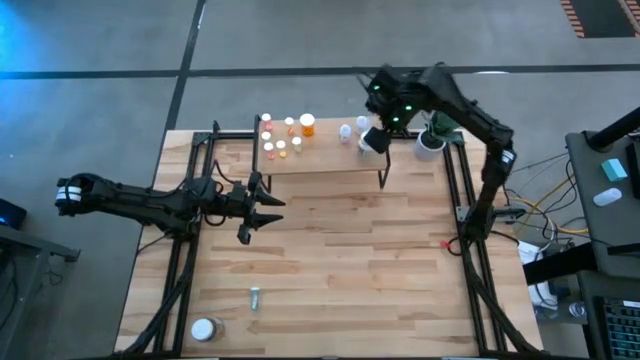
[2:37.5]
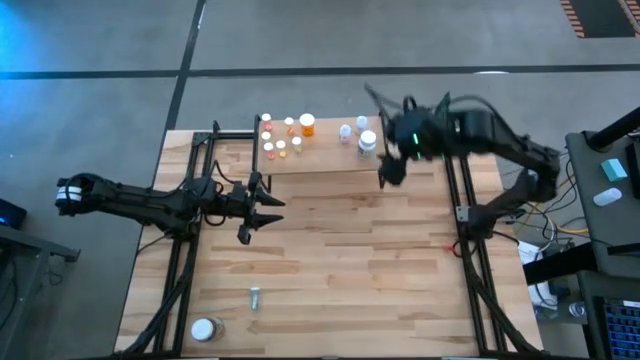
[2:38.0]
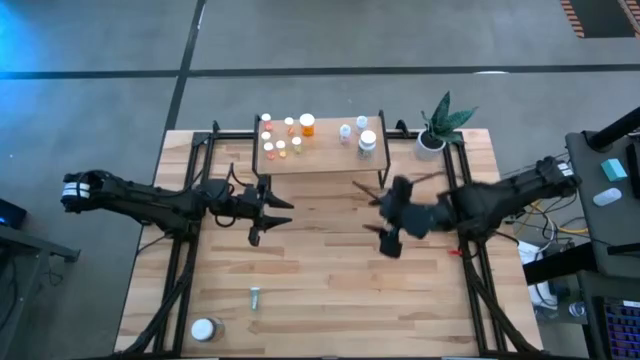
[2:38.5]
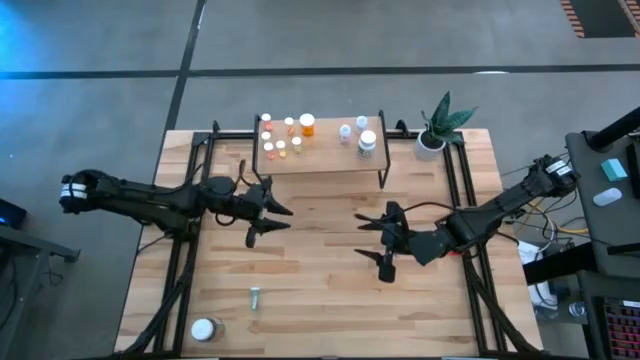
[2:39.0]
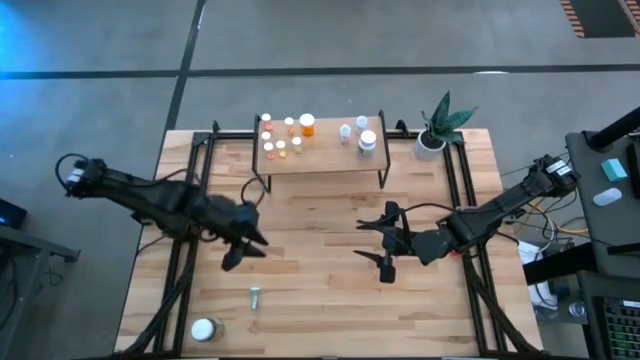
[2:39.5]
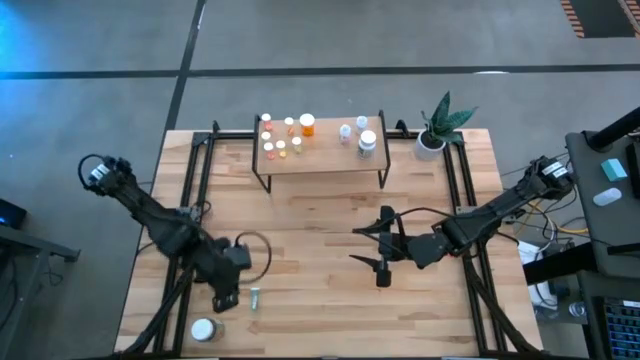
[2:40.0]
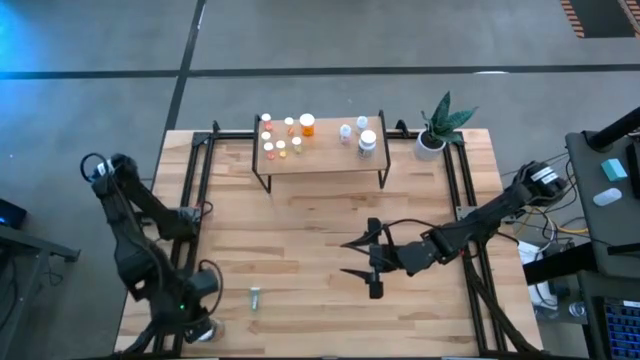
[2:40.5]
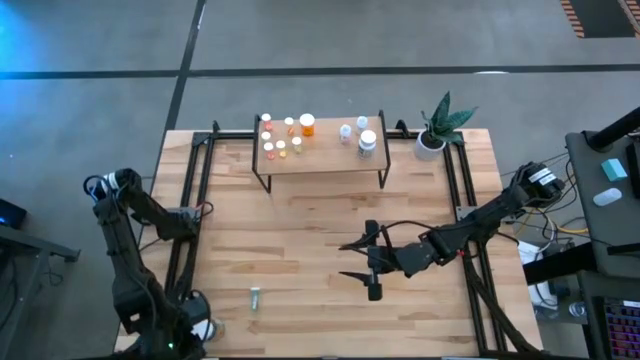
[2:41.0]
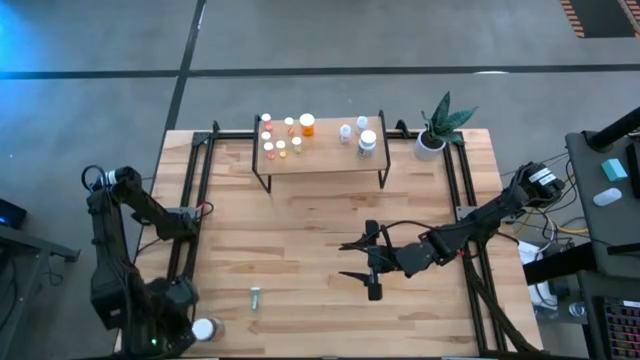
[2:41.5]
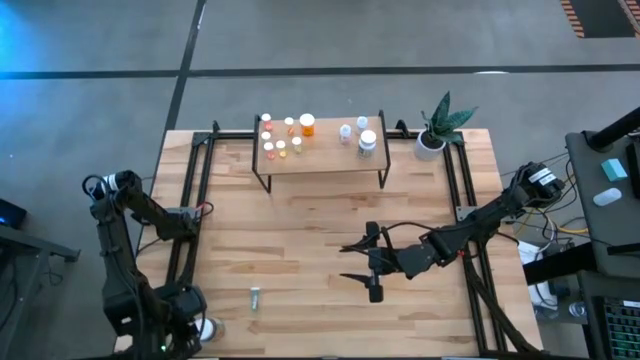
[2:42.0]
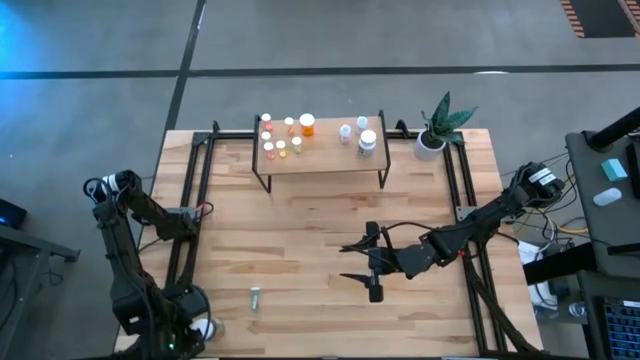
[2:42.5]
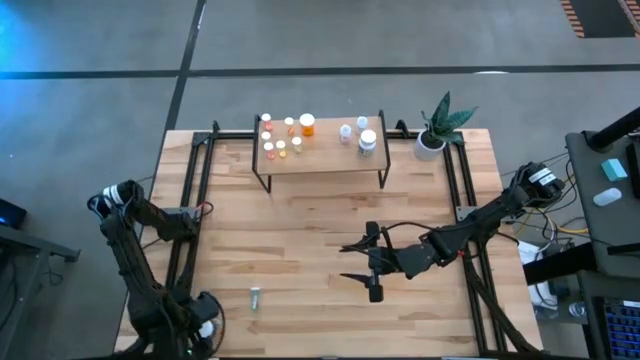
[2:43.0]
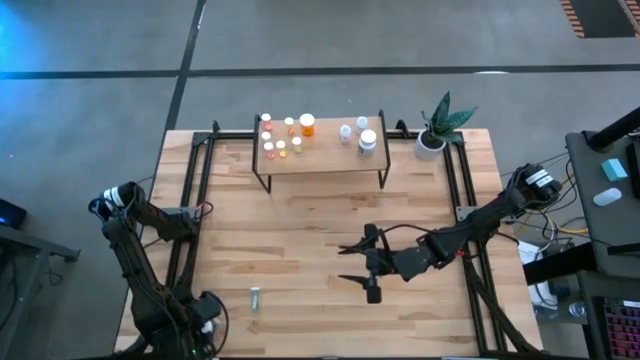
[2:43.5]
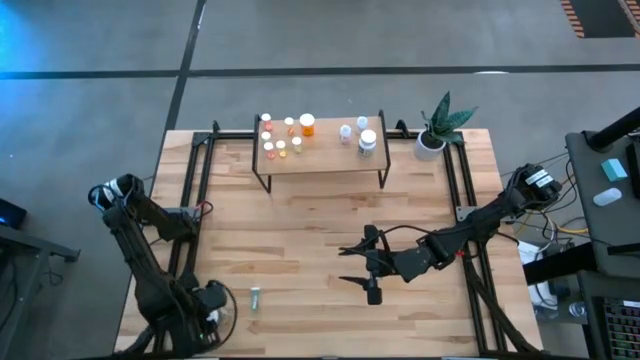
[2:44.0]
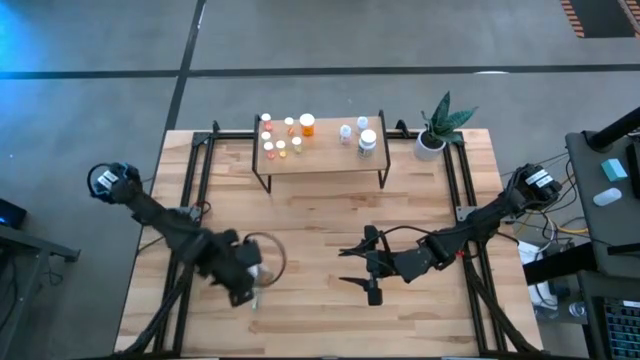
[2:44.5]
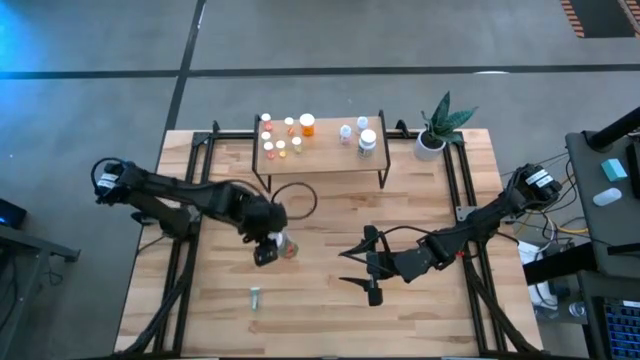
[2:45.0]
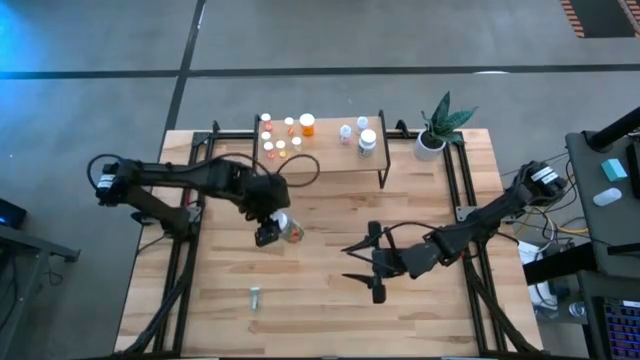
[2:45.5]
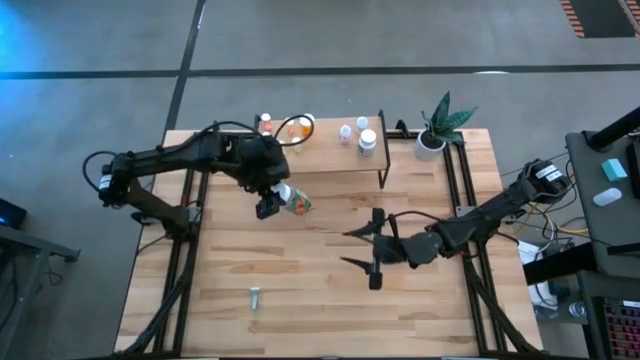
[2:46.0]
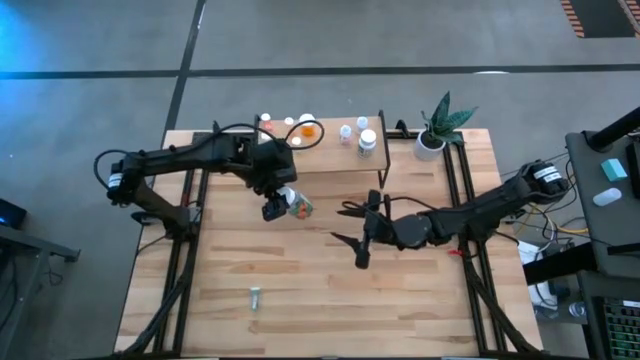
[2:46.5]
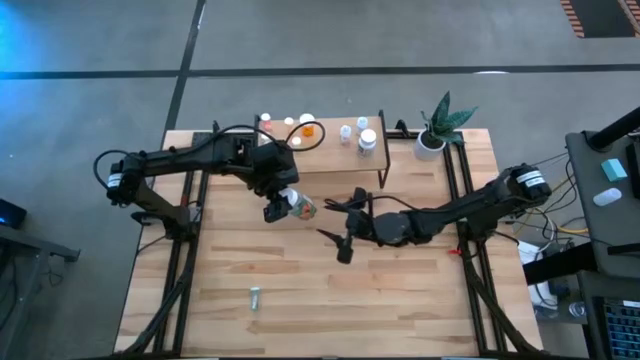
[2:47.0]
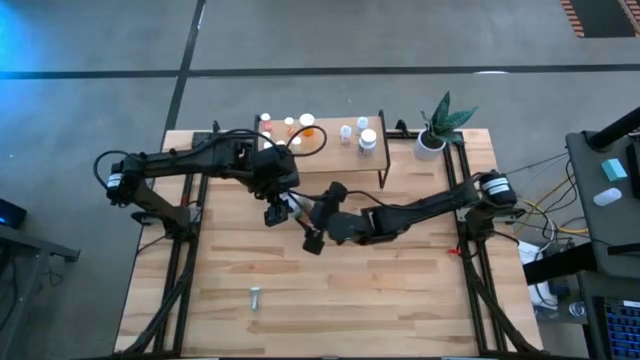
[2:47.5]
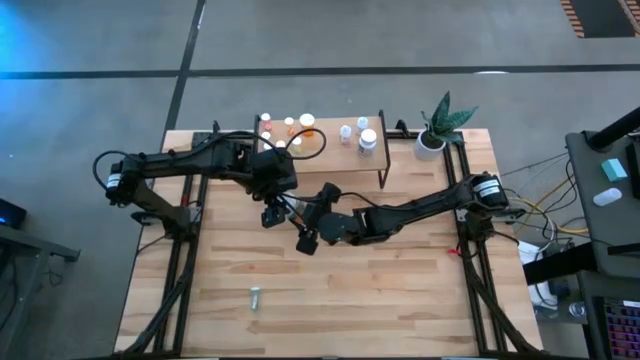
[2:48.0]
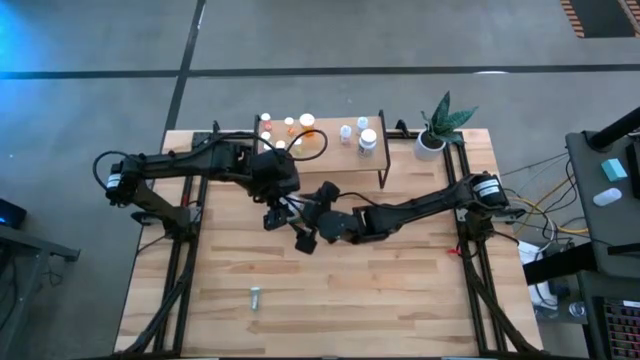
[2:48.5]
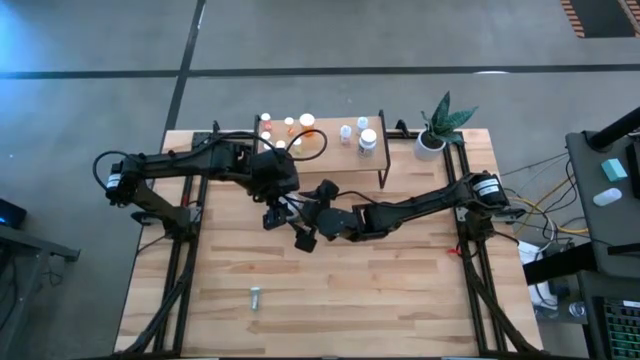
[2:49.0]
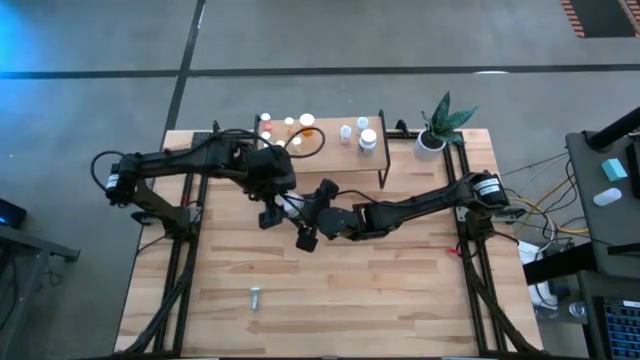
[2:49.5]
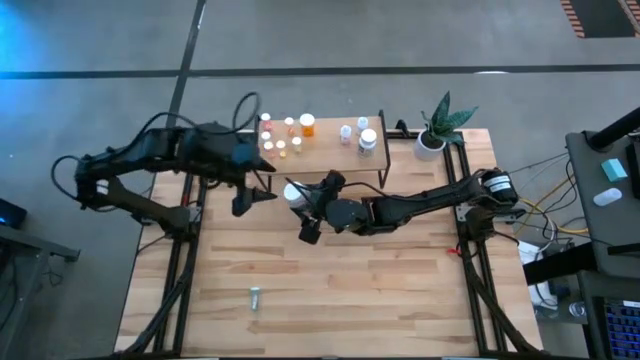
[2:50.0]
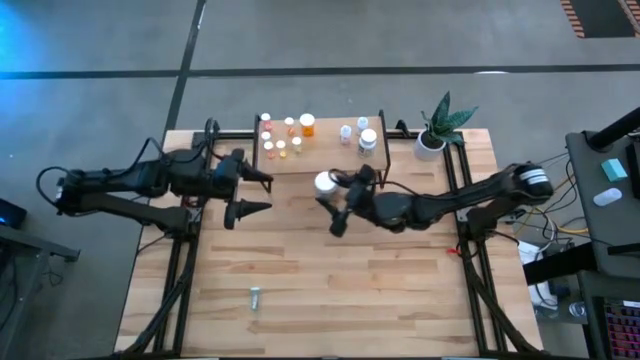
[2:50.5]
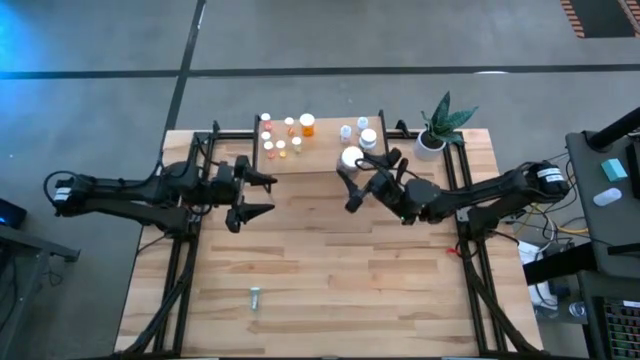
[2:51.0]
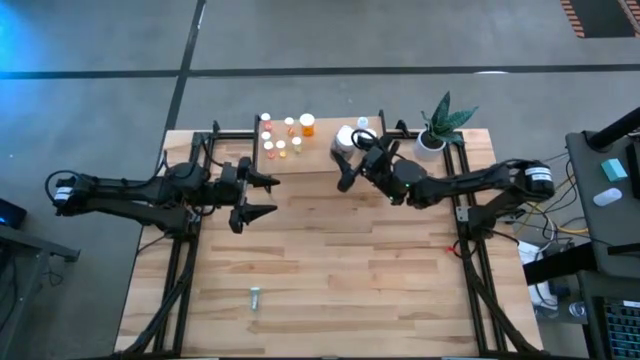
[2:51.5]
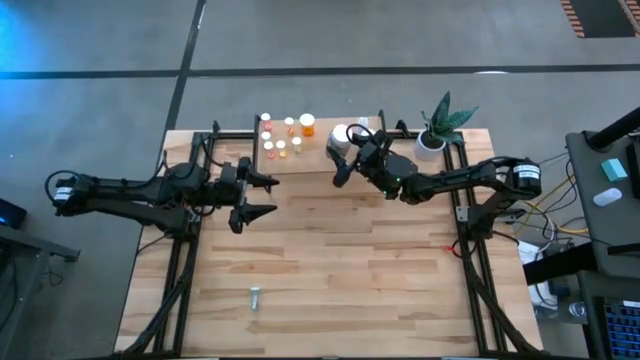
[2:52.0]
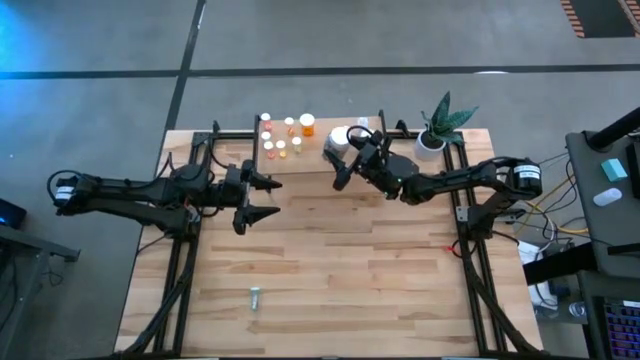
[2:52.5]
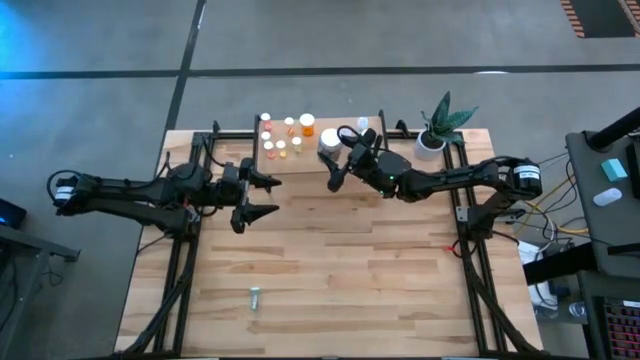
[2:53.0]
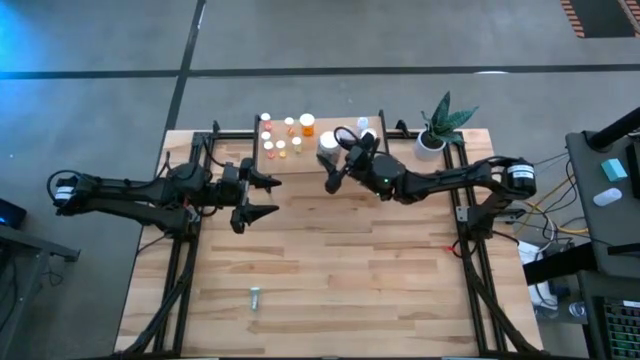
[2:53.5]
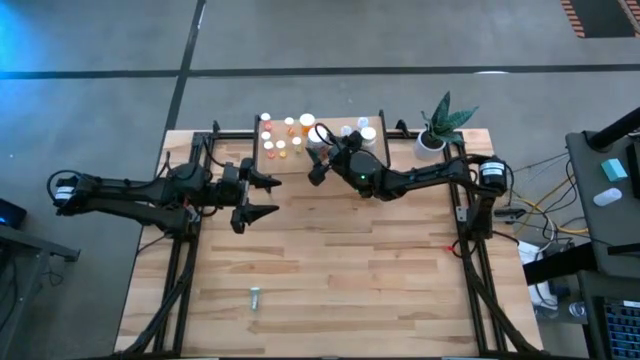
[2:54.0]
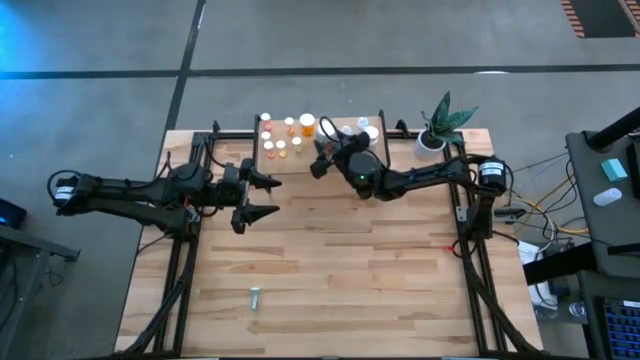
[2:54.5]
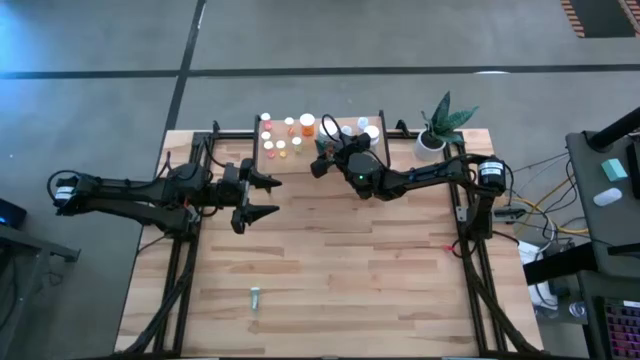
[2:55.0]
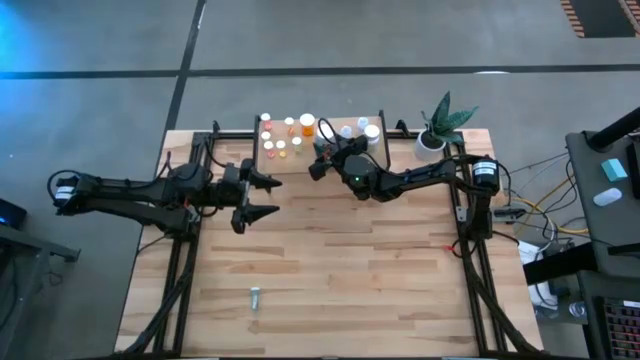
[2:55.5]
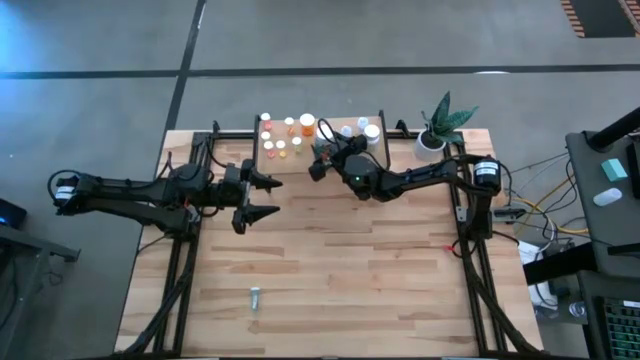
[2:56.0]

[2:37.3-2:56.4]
Task: Pick and place medicine bottles onto shelf by color
Put the green pill bottle on the shelf
